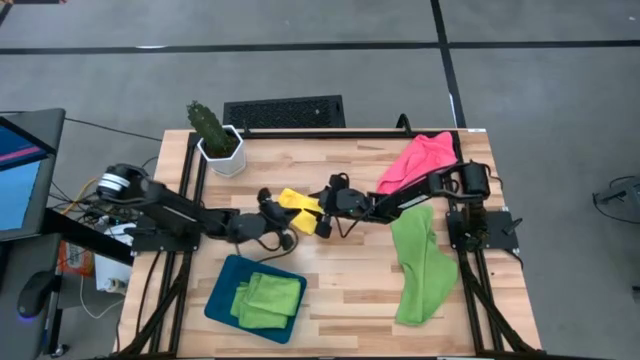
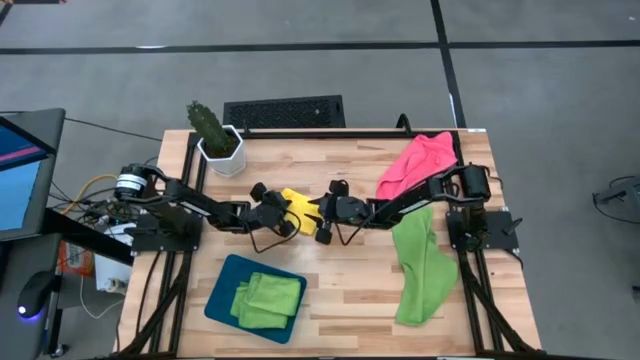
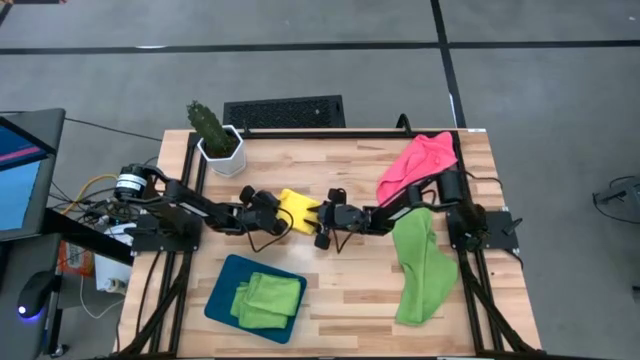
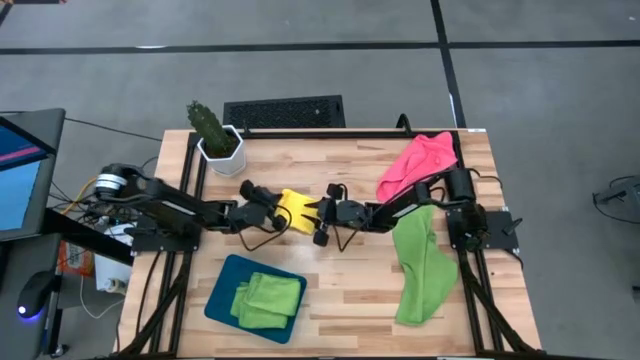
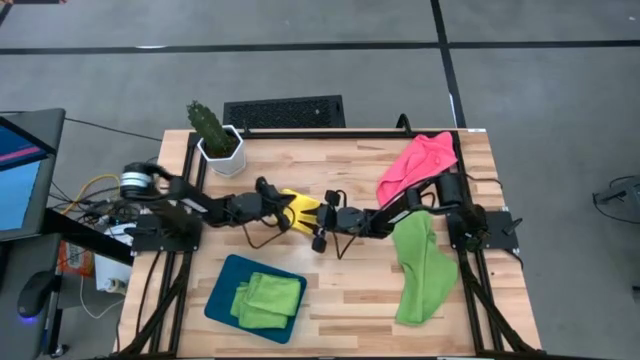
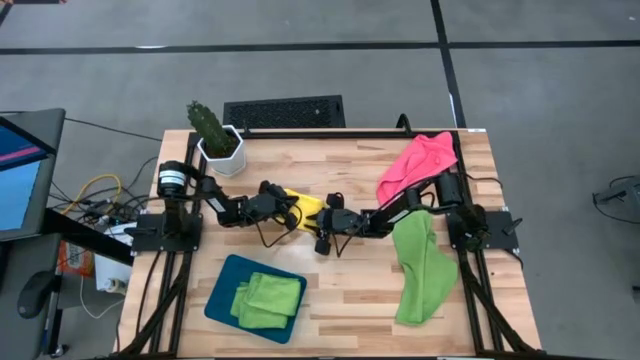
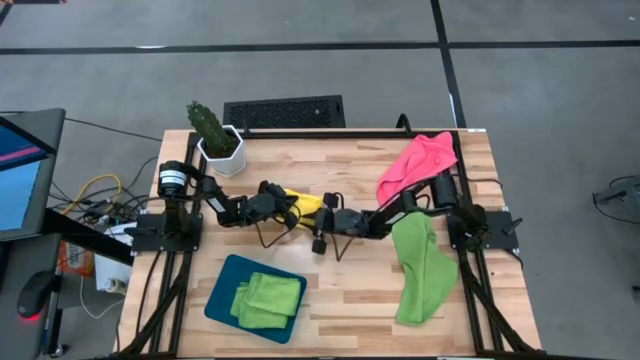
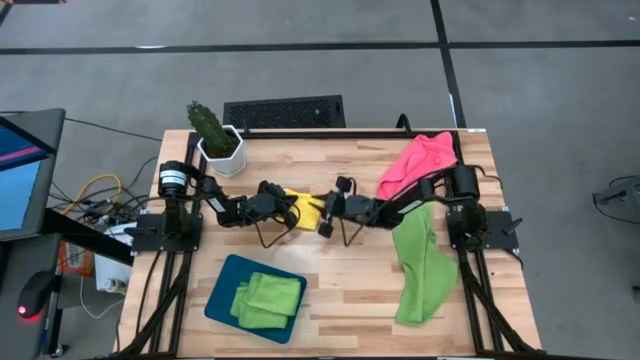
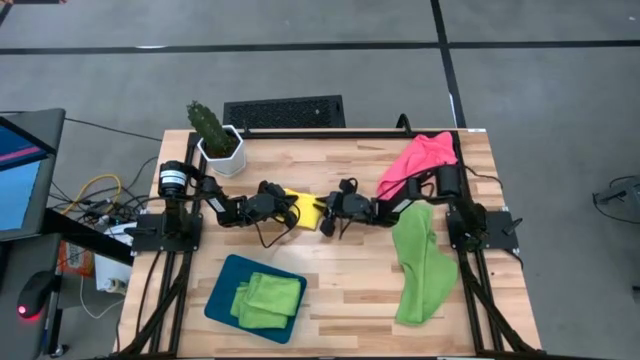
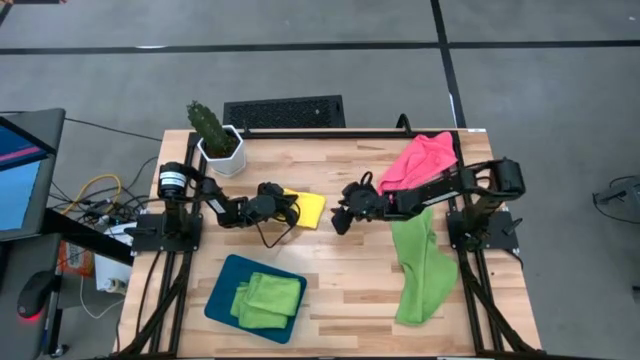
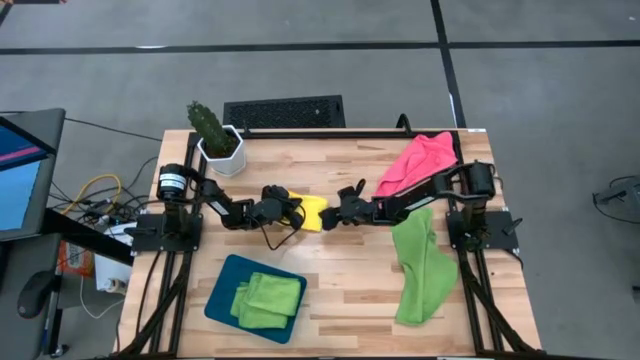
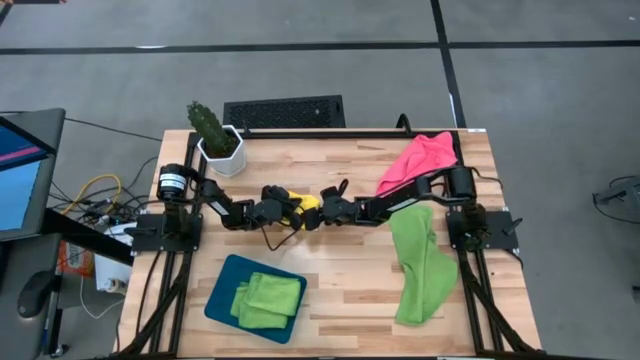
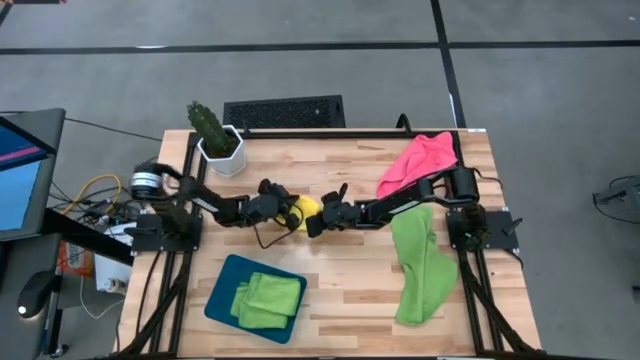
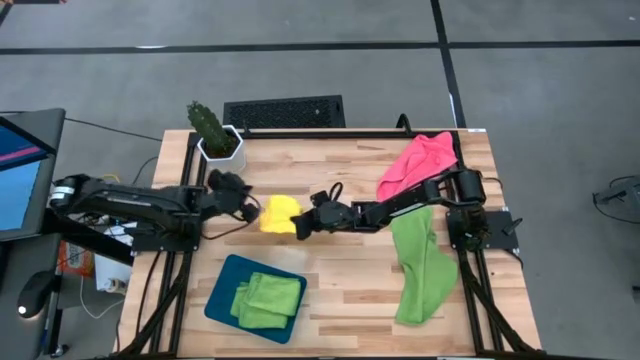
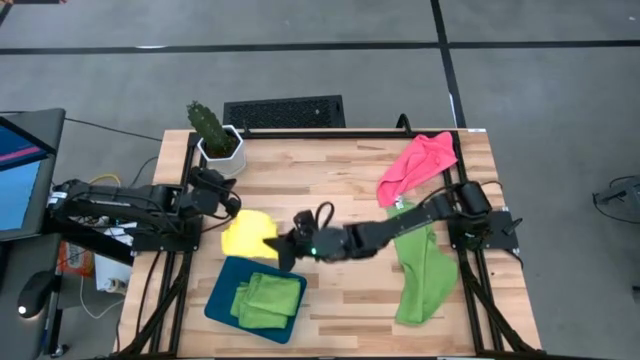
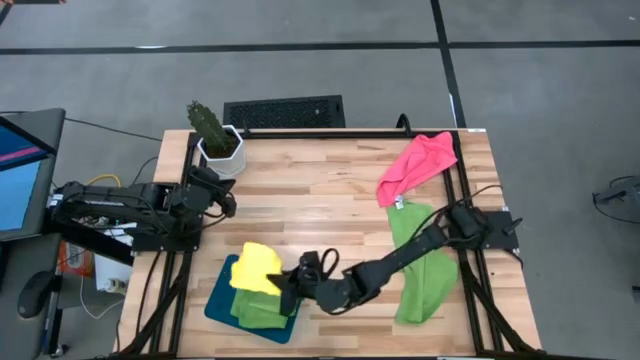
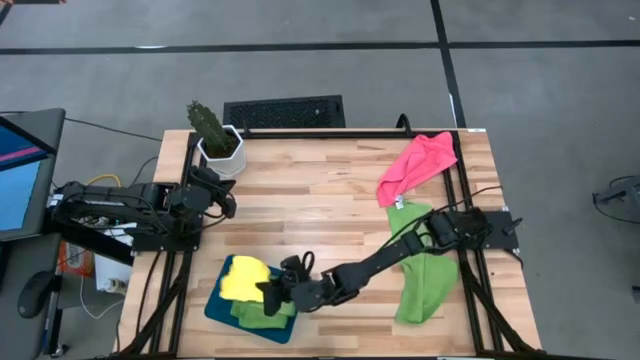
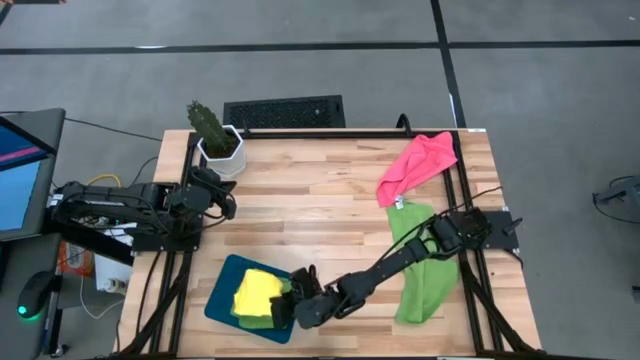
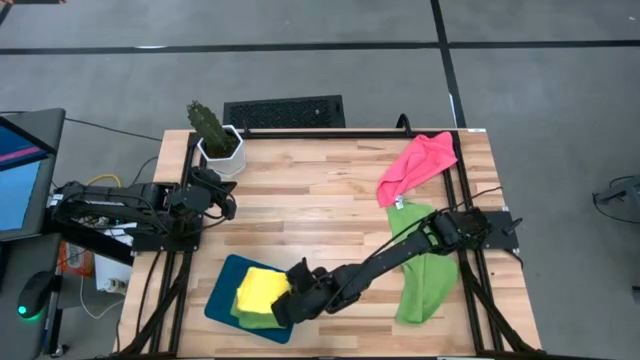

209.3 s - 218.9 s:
Task: Fold microfiber towels
Stack the folded yellow microfiber on the green microfiber cloth in the blue bin

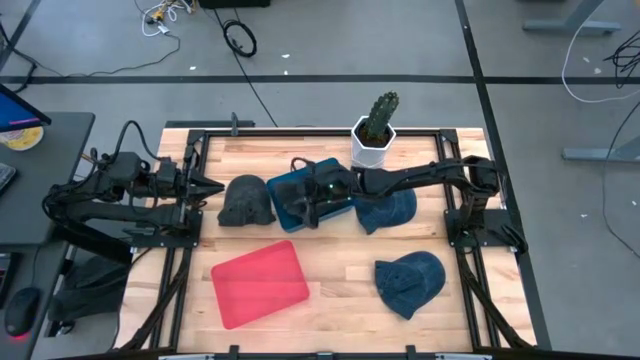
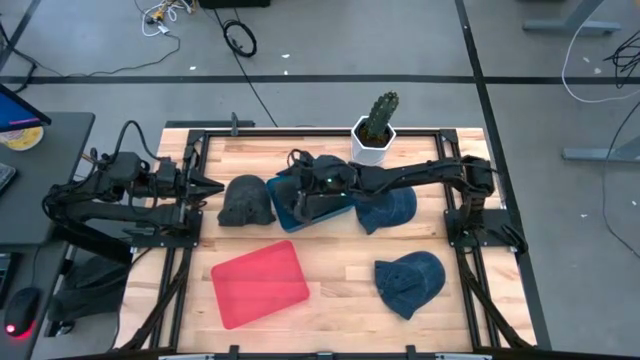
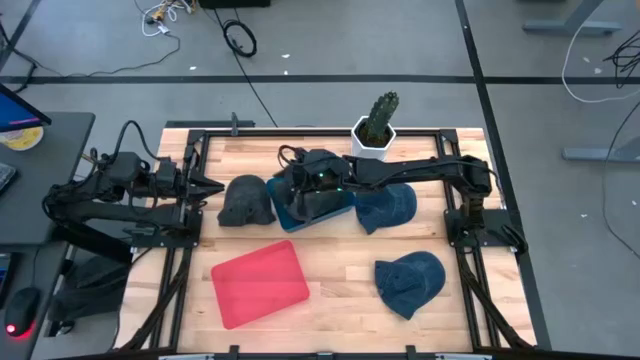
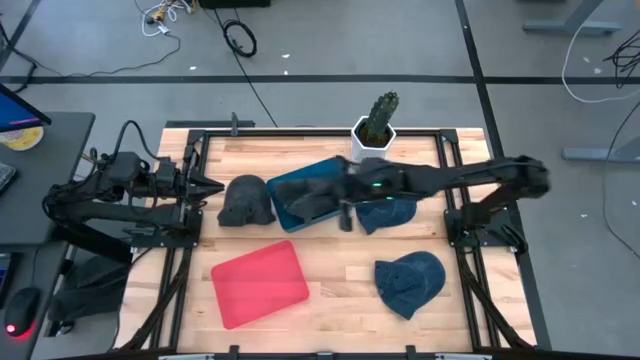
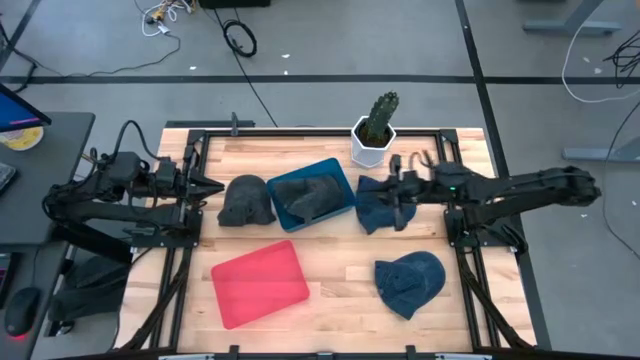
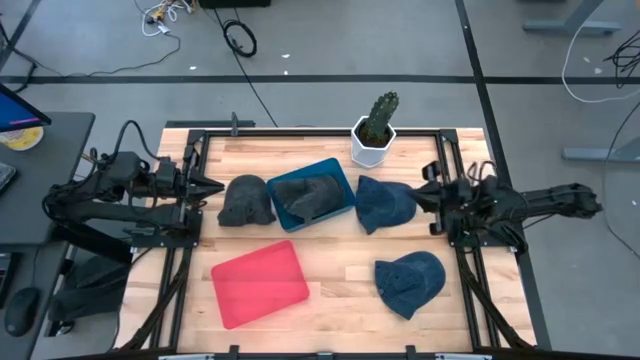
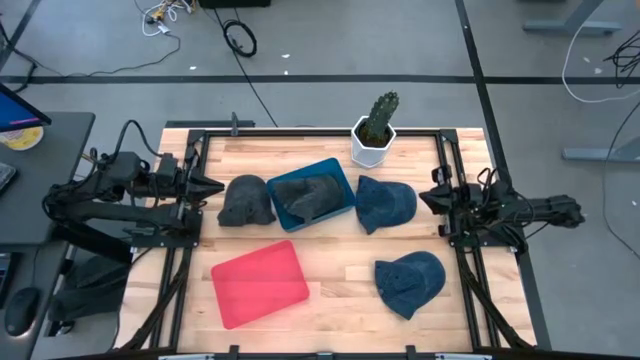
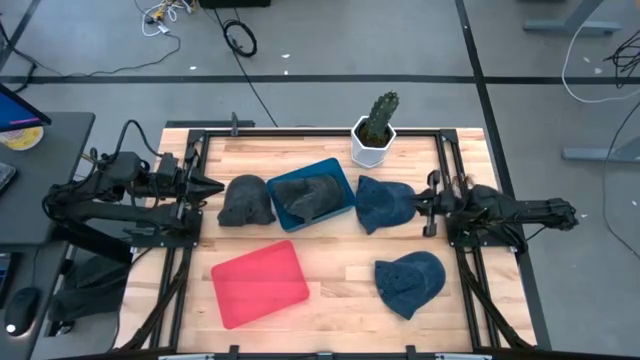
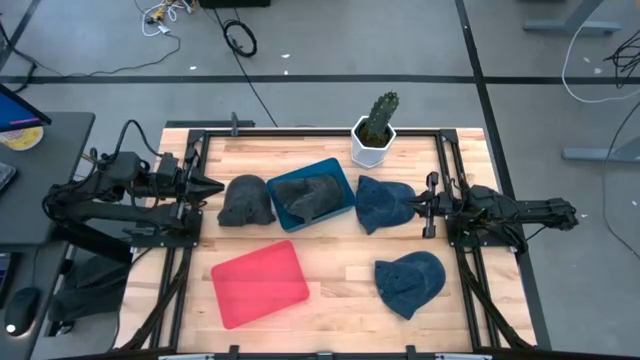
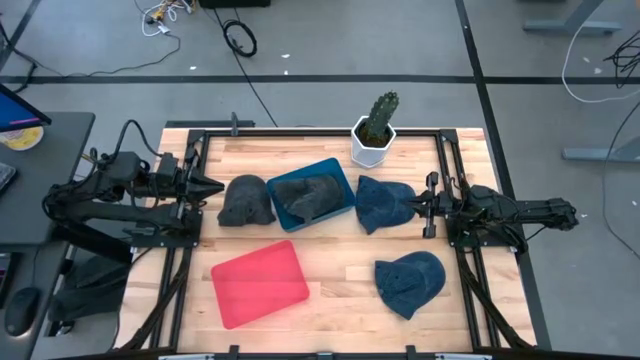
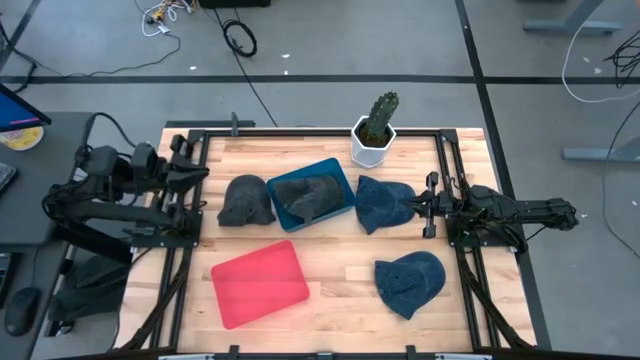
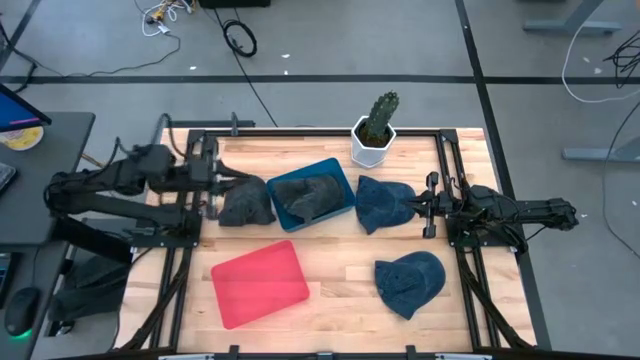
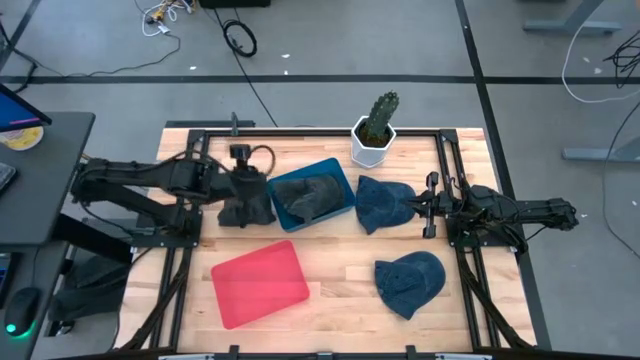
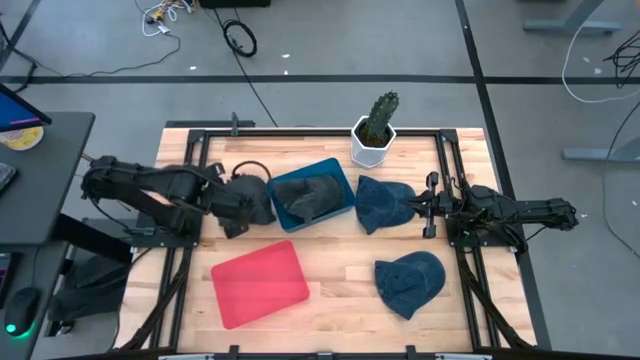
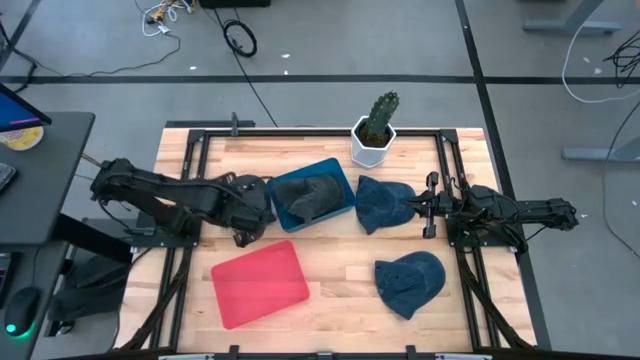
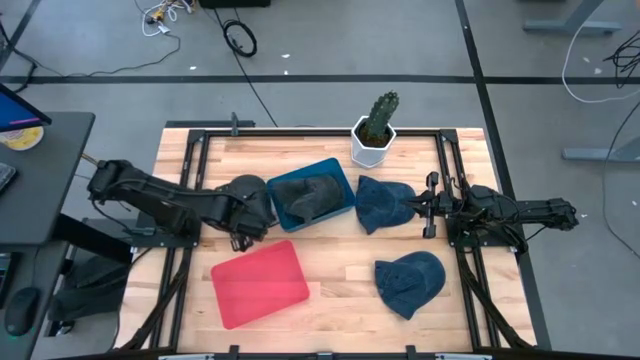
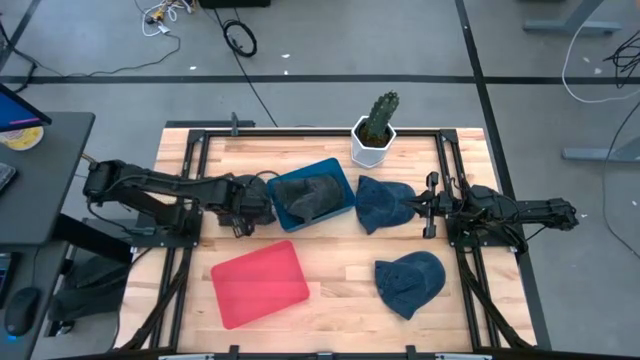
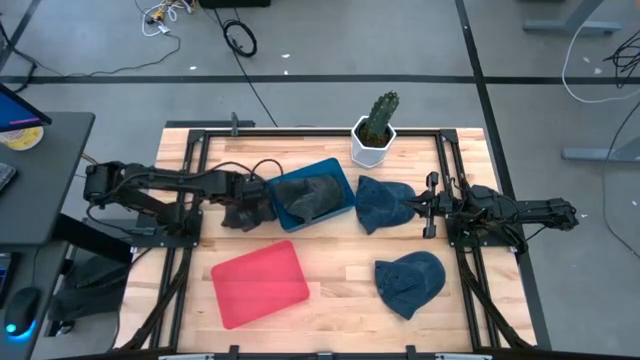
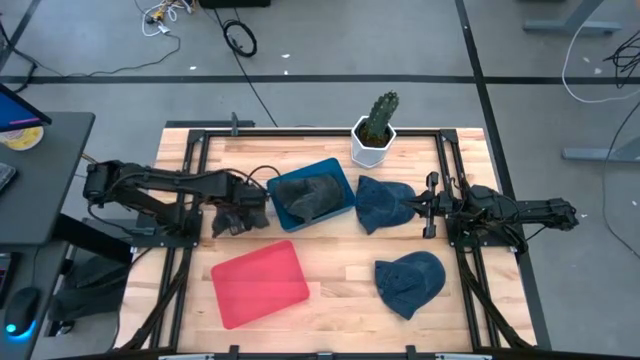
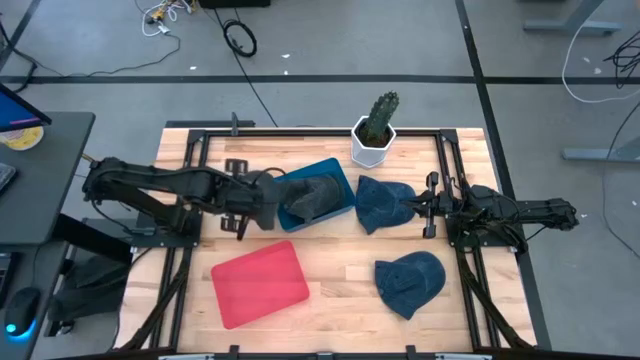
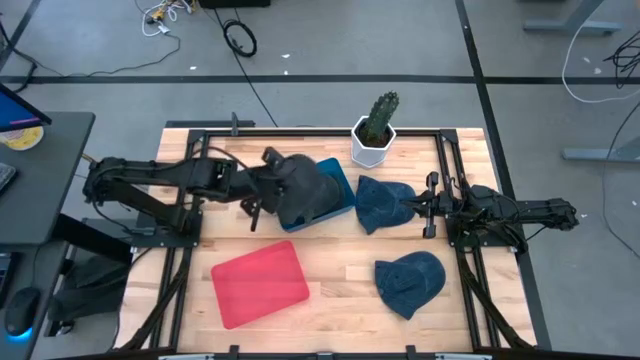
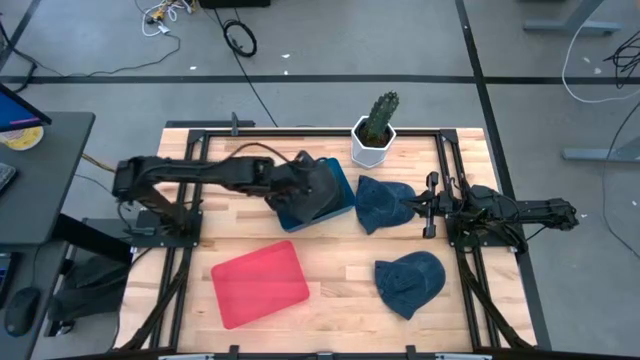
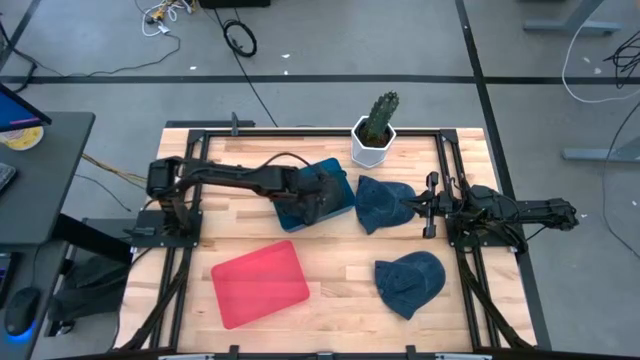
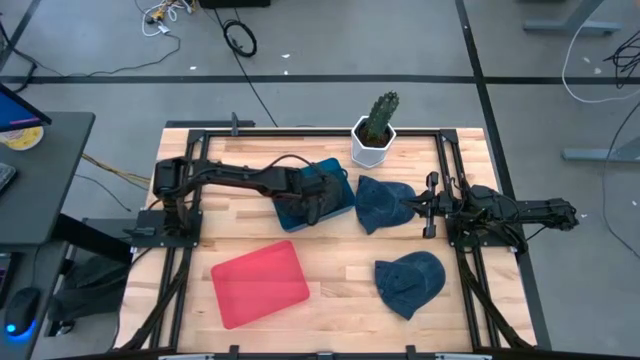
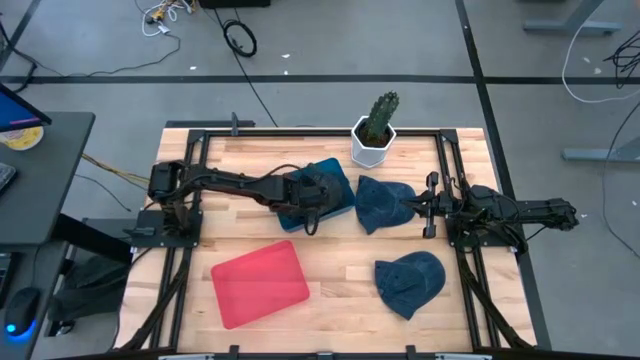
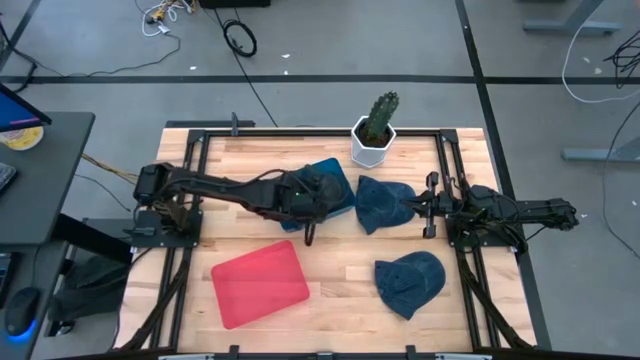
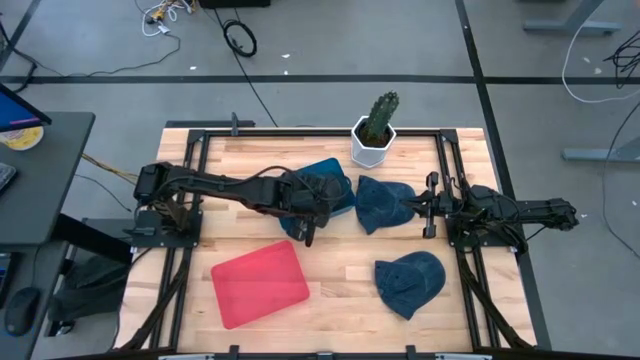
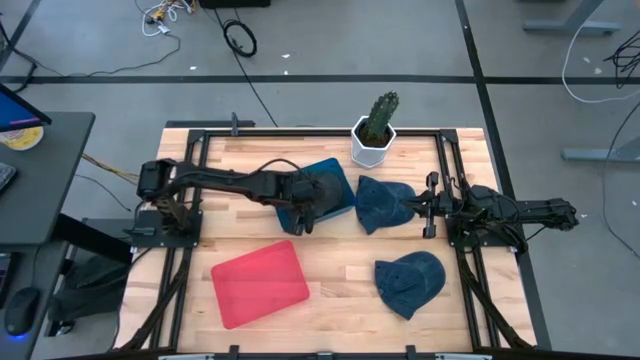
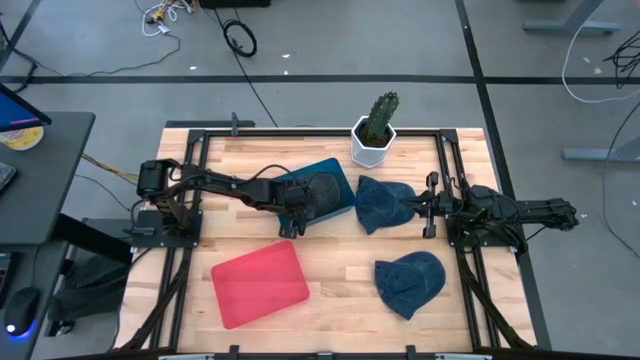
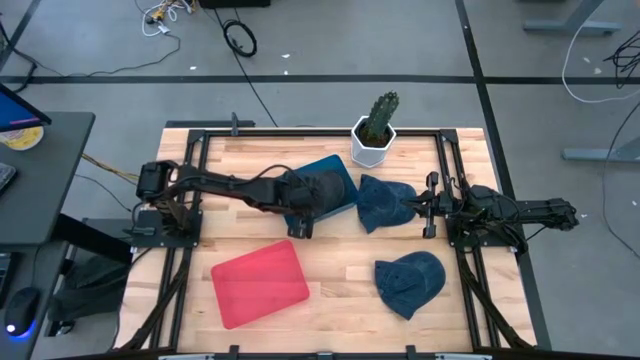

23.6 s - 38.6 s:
Task: Pick & Place hat
Put the gray cap into the blue bin
